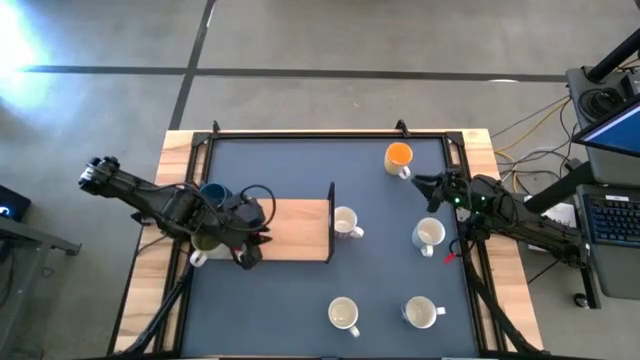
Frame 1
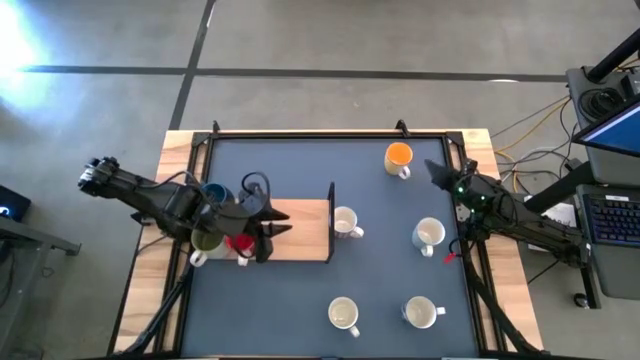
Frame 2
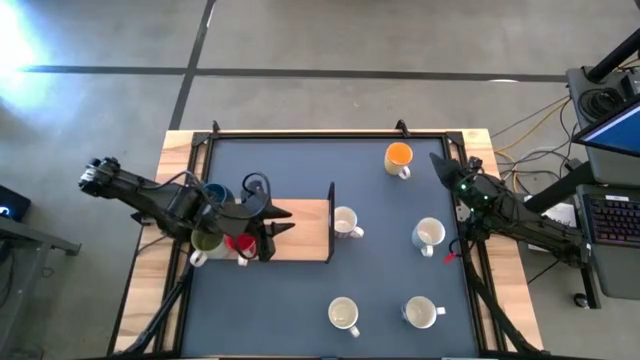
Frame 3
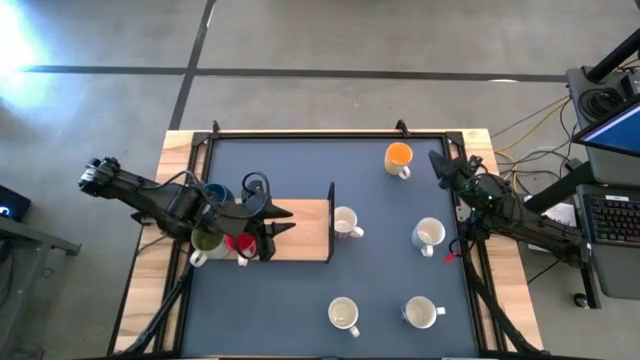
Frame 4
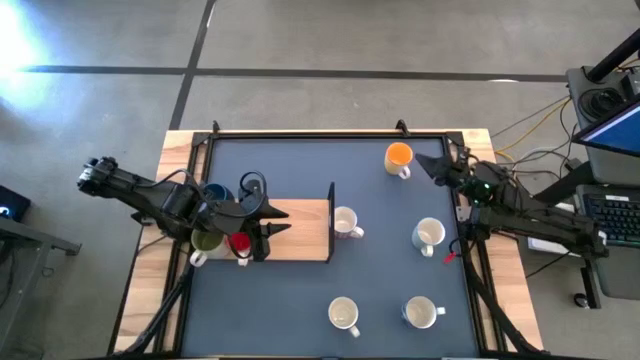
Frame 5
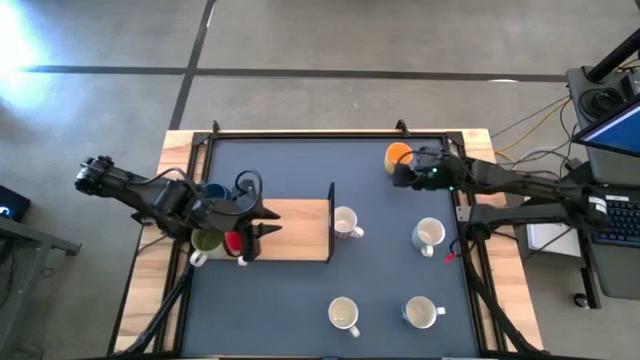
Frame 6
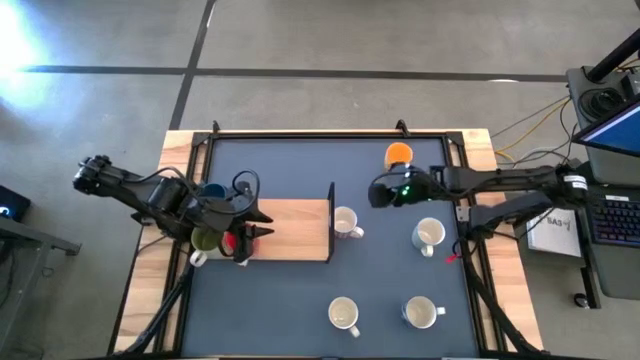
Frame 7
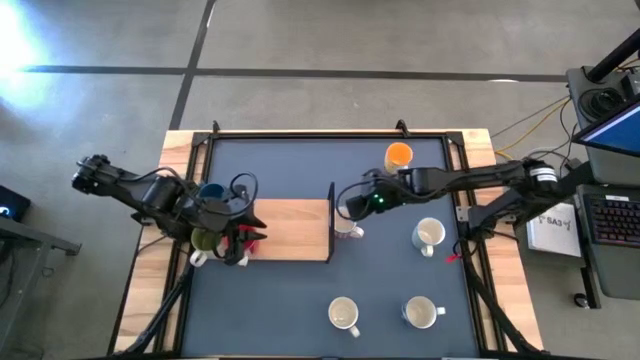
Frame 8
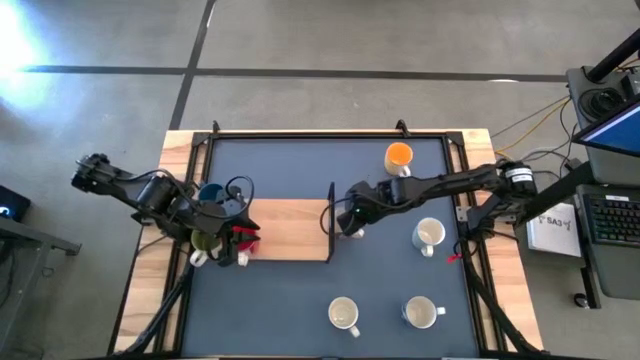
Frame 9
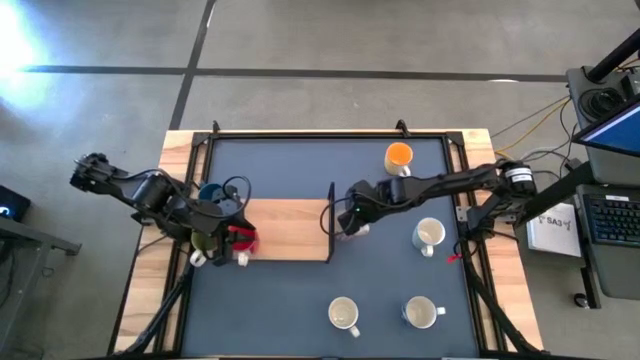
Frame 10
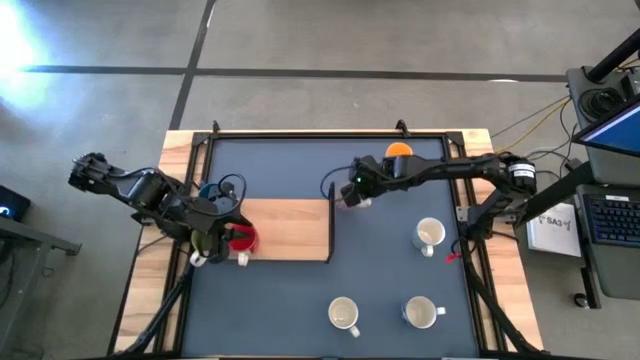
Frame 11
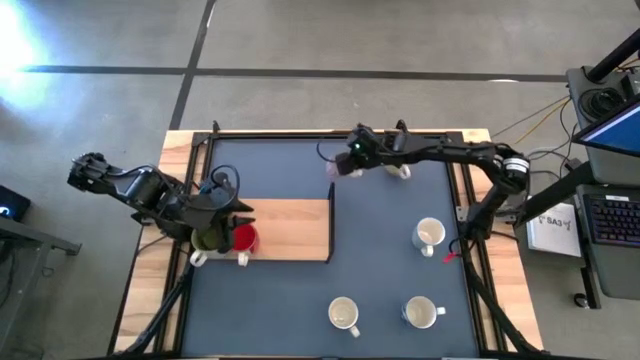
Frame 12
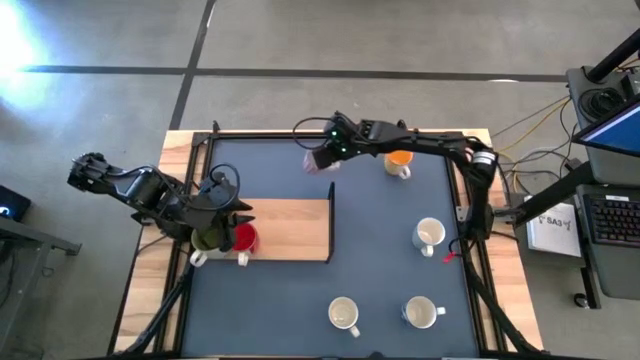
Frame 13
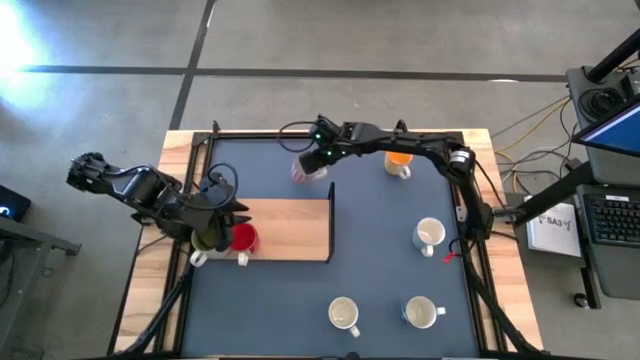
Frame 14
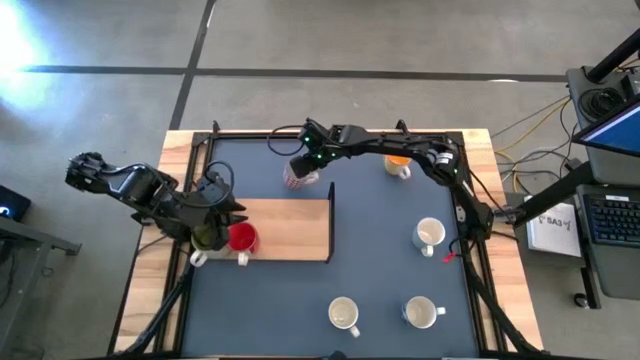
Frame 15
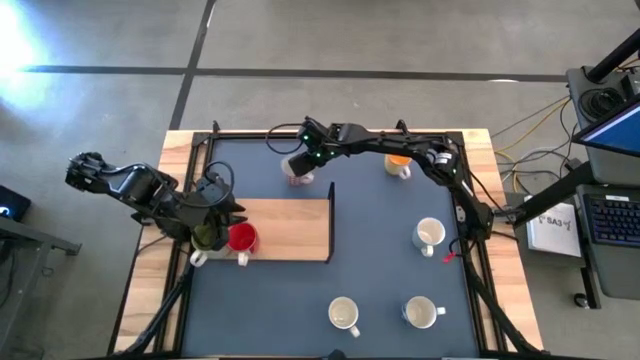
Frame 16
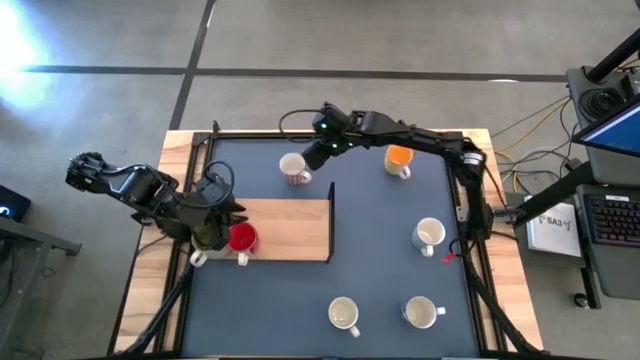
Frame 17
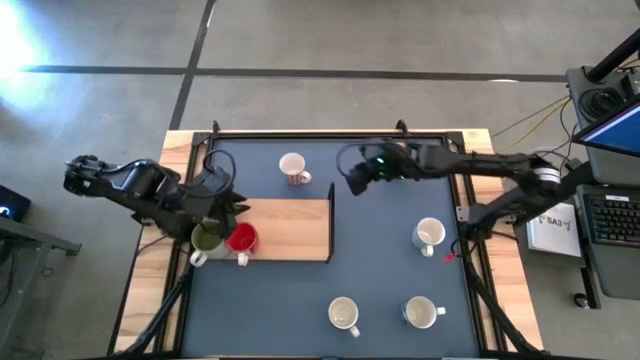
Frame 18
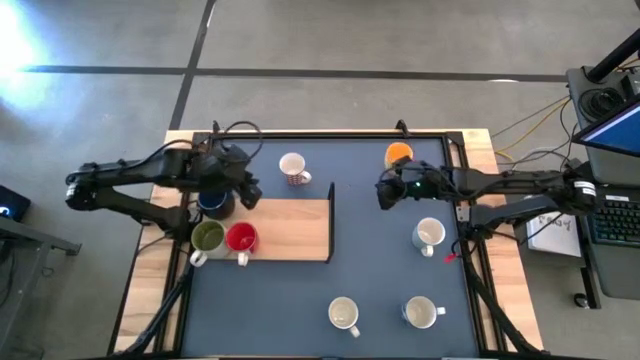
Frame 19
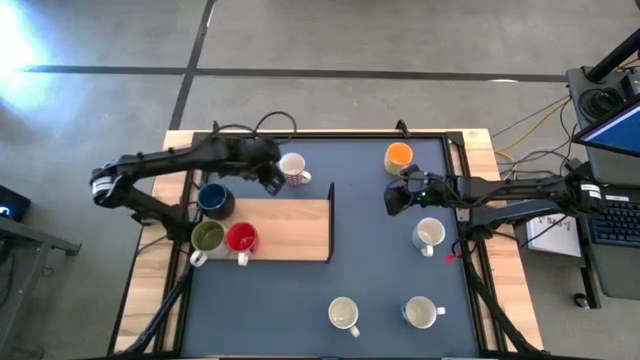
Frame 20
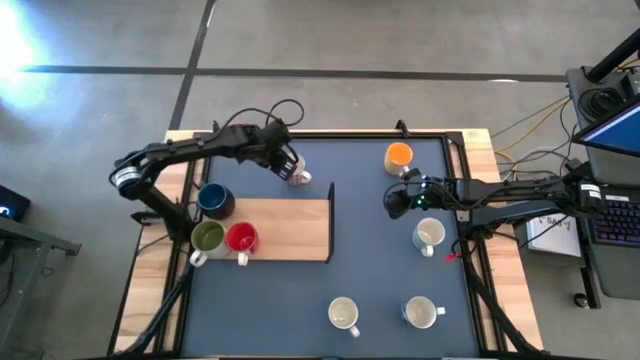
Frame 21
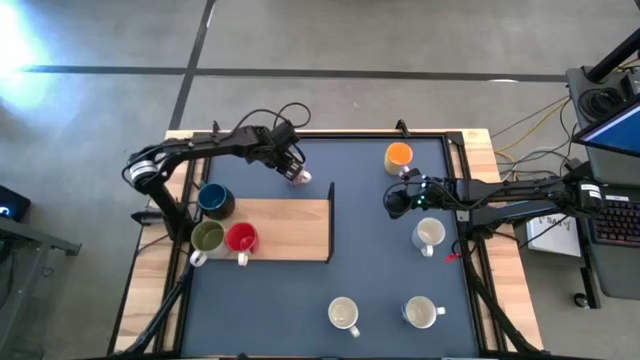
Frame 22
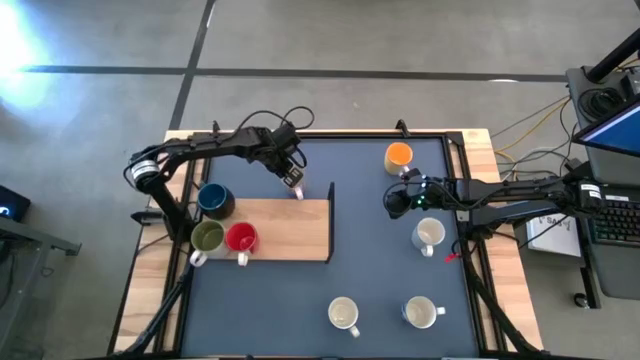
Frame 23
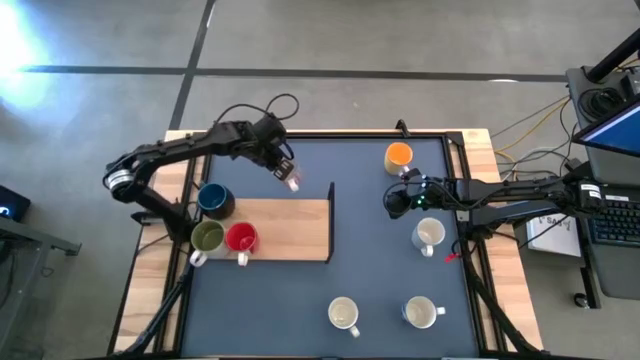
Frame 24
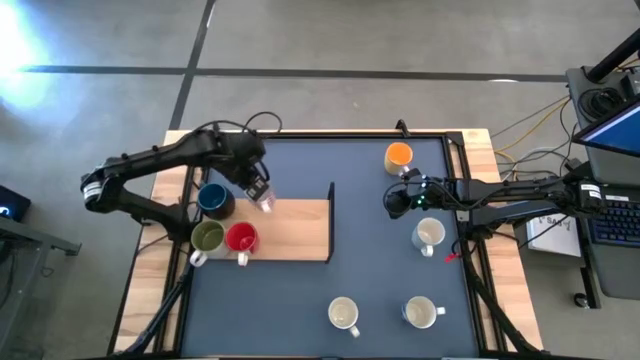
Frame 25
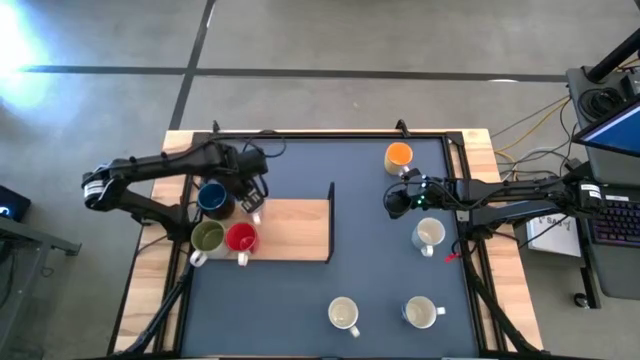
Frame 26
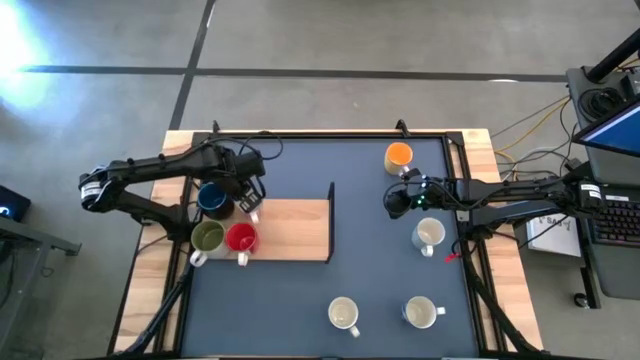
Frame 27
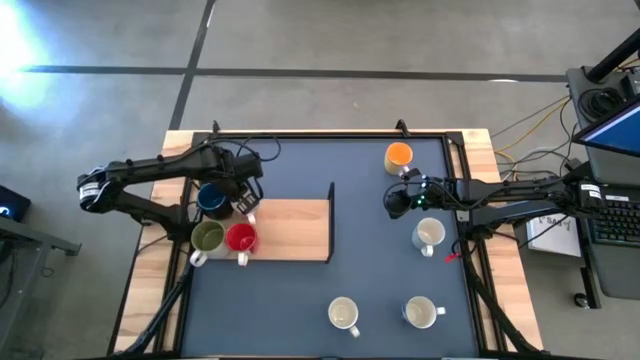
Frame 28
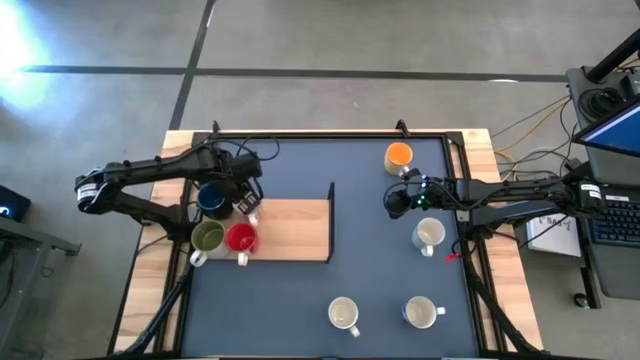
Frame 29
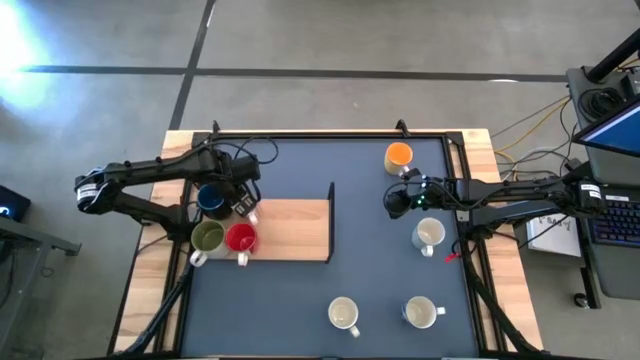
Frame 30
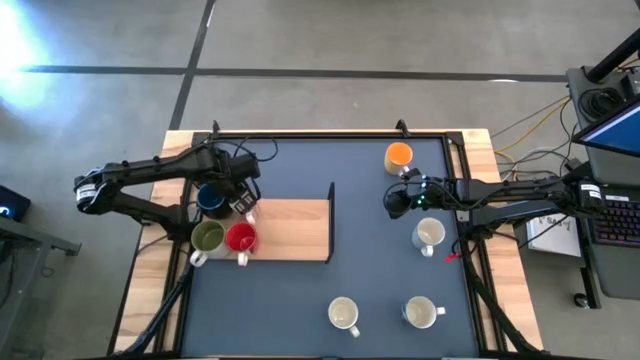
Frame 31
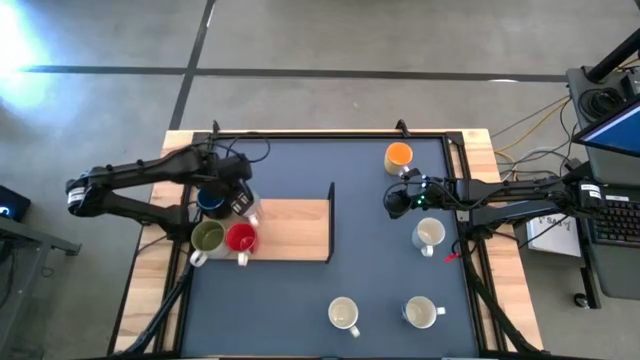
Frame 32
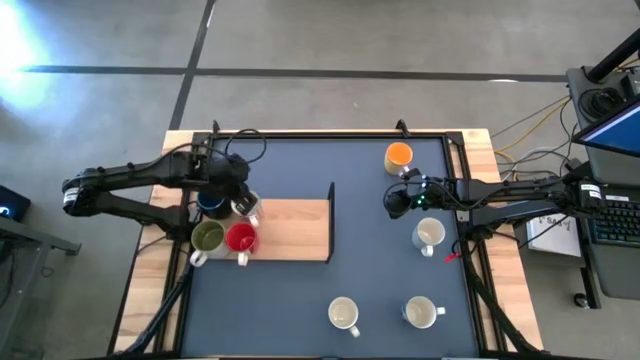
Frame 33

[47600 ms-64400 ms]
Task: Place coffee mugs
Put the white red patterned mug on the shelf

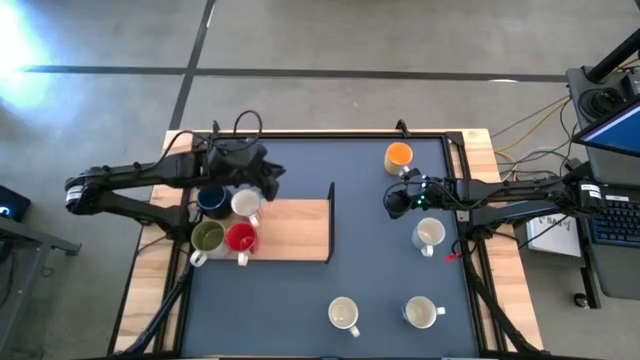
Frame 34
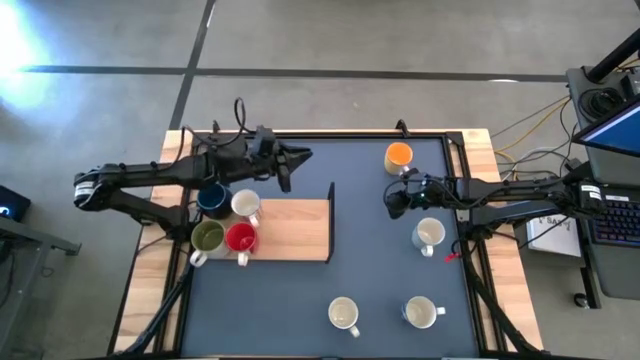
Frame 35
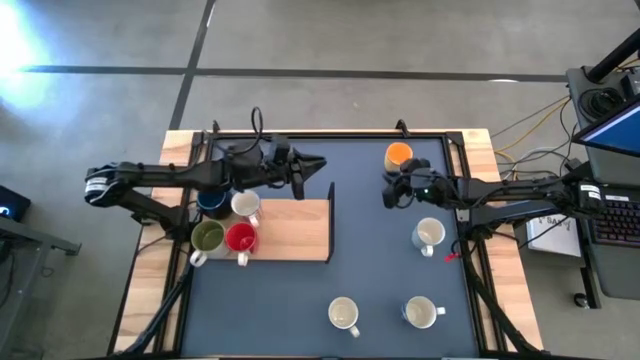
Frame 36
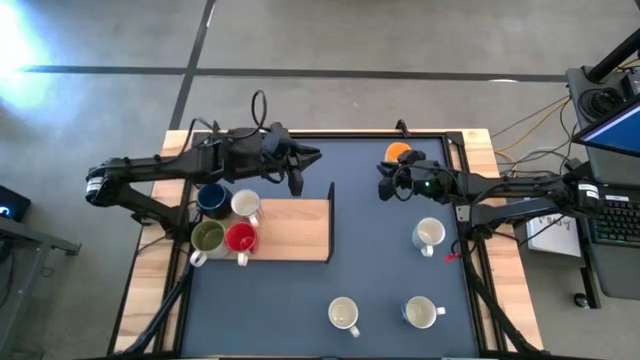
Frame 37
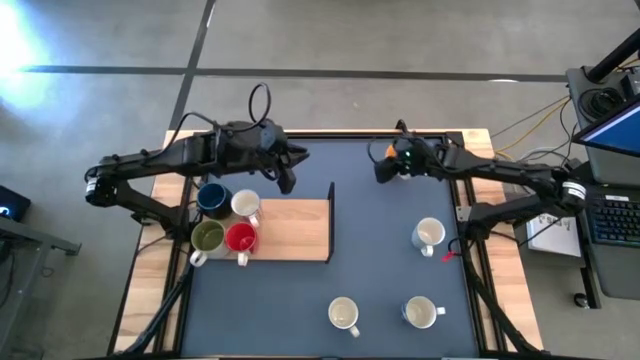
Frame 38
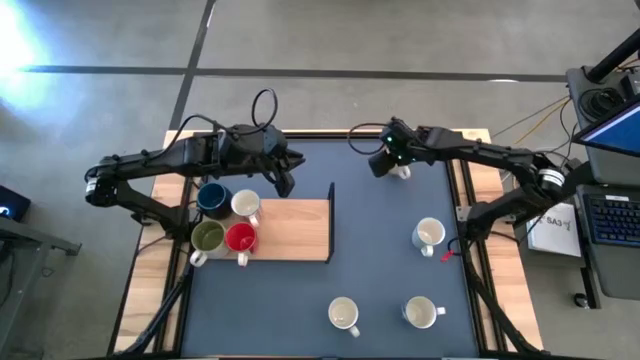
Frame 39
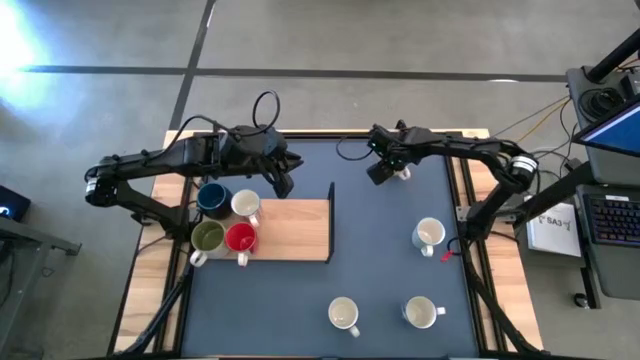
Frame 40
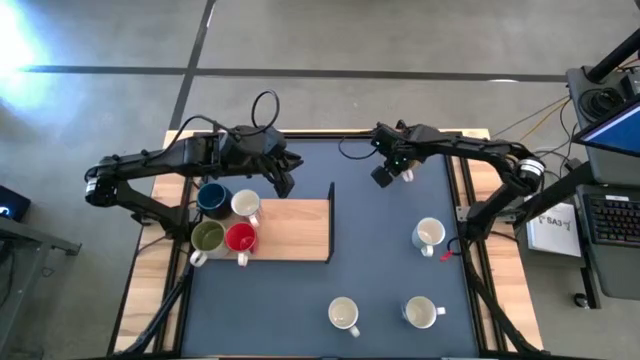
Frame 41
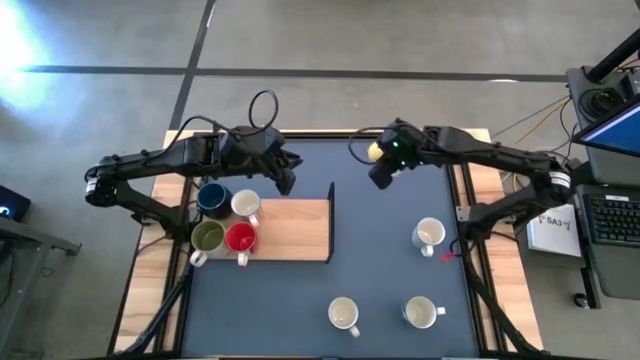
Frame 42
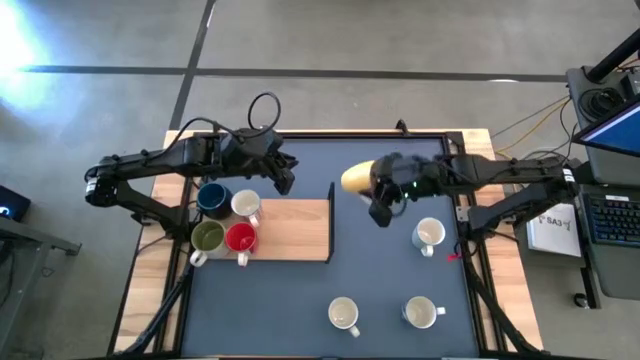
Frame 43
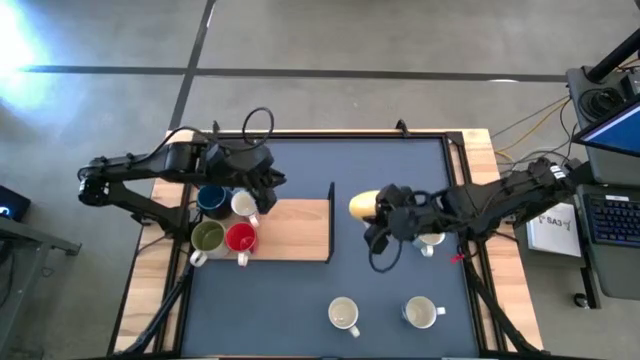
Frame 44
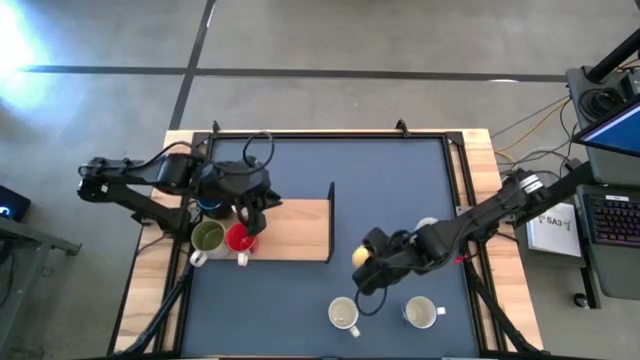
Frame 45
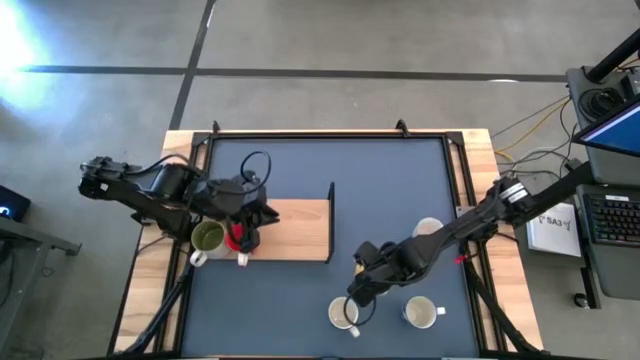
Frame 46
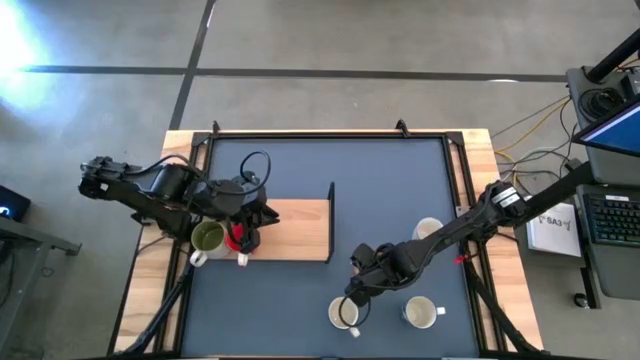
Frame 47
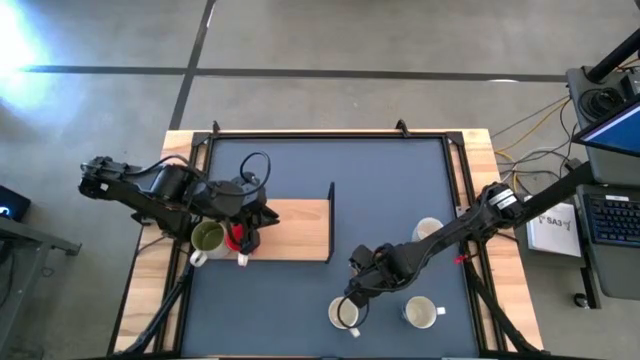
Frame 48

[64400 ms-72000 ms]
Move the yellow mug to the bottom right side of the shelf
